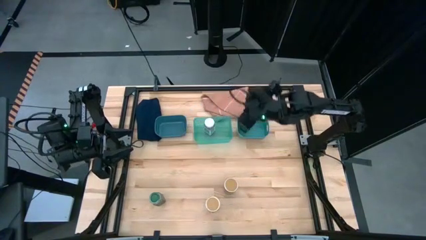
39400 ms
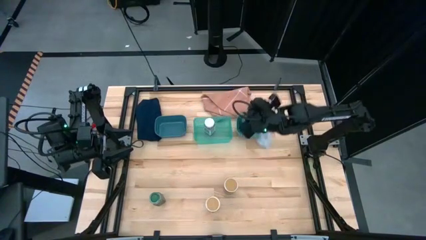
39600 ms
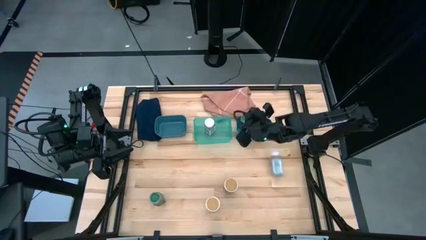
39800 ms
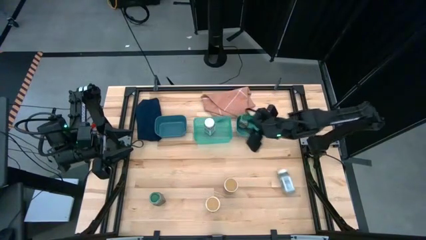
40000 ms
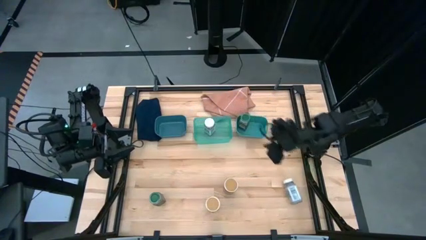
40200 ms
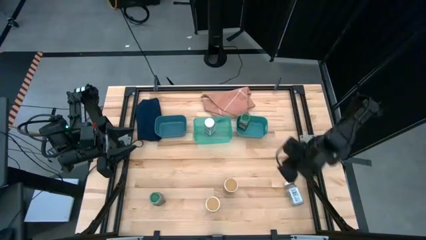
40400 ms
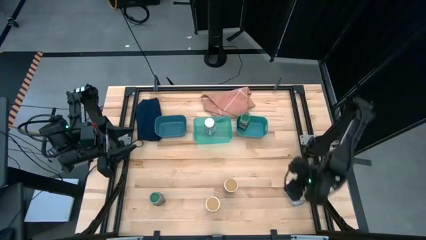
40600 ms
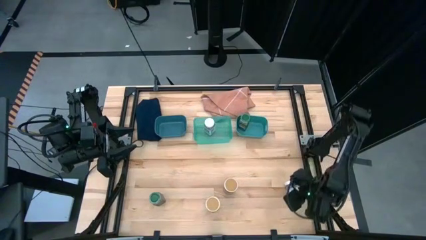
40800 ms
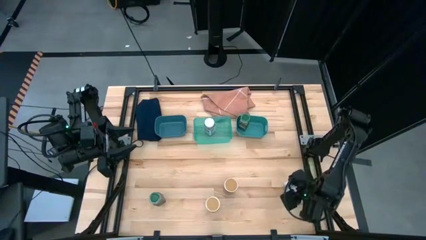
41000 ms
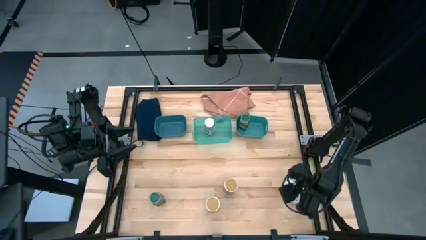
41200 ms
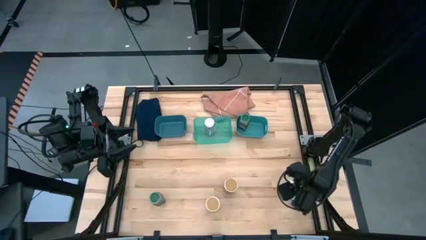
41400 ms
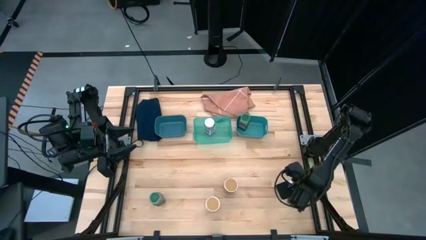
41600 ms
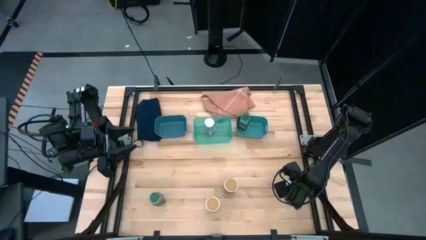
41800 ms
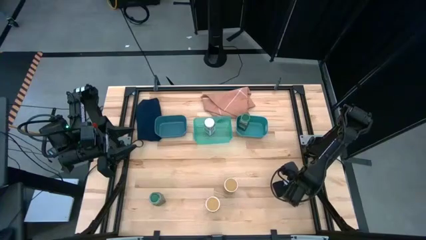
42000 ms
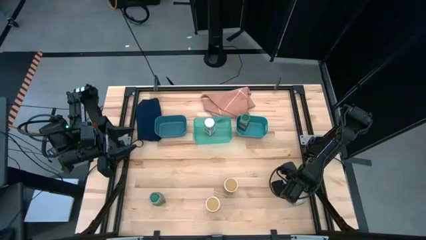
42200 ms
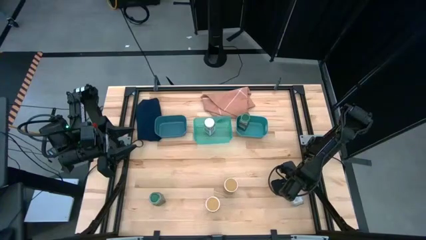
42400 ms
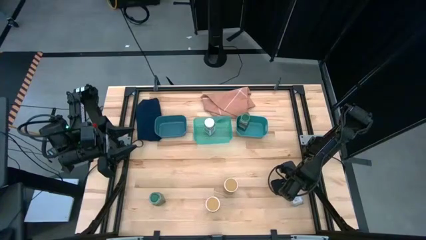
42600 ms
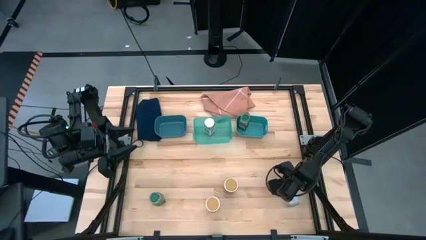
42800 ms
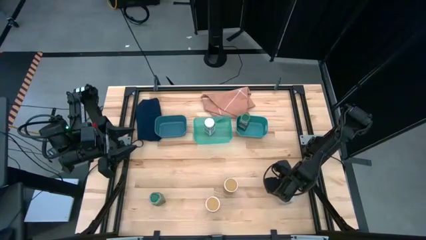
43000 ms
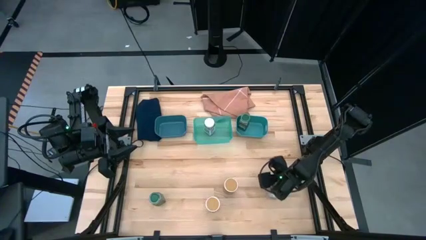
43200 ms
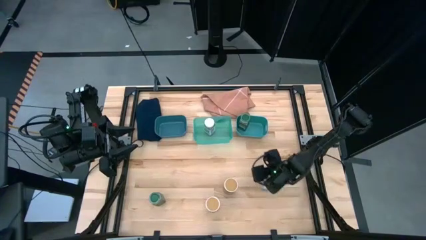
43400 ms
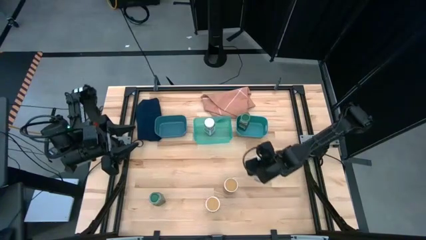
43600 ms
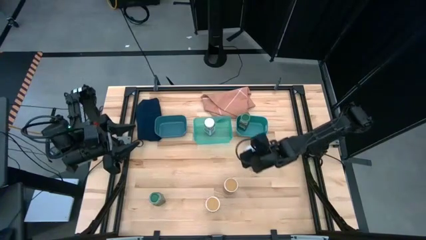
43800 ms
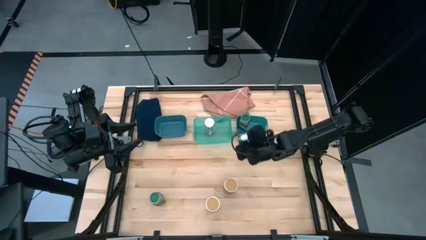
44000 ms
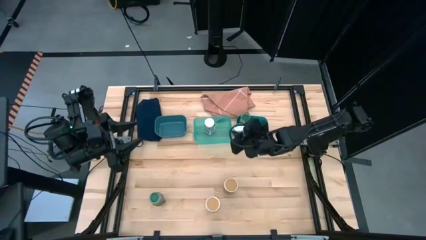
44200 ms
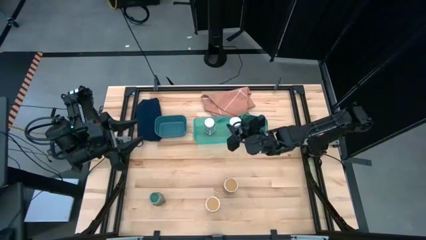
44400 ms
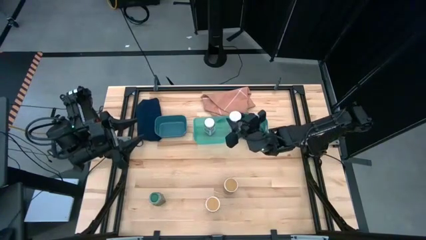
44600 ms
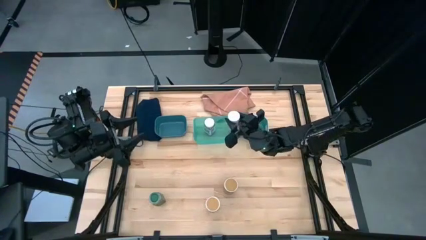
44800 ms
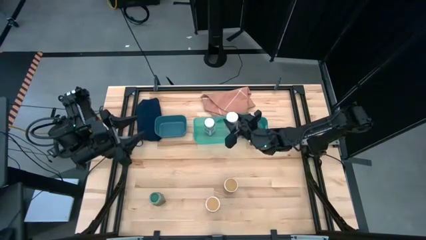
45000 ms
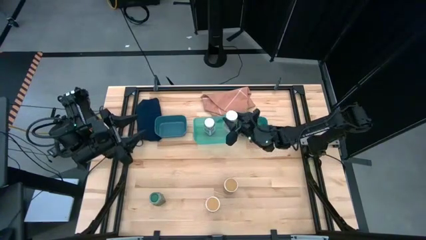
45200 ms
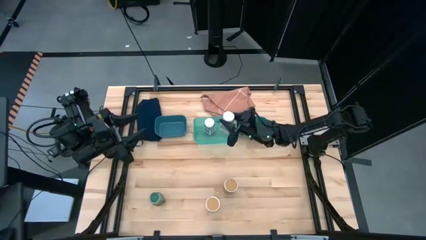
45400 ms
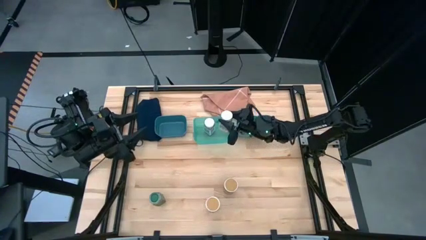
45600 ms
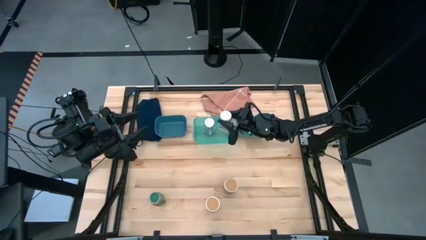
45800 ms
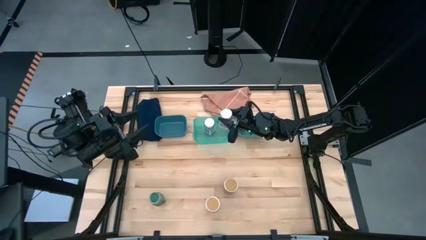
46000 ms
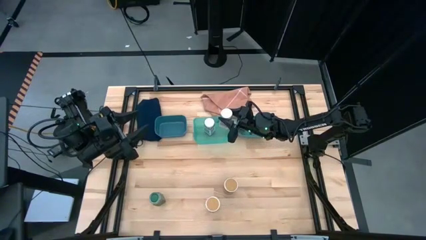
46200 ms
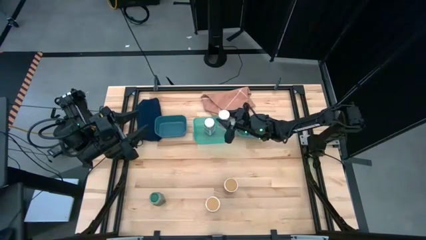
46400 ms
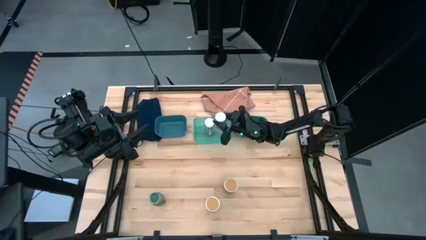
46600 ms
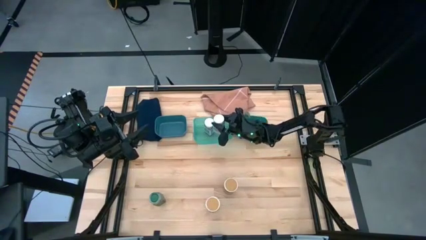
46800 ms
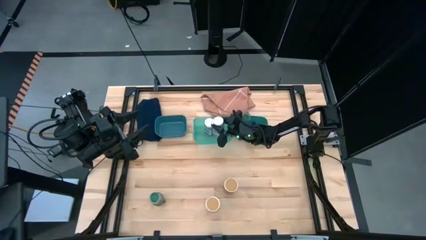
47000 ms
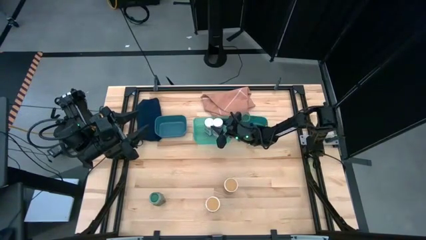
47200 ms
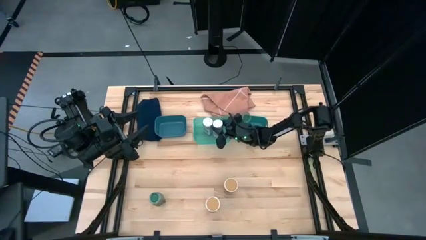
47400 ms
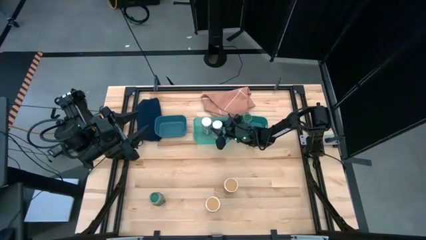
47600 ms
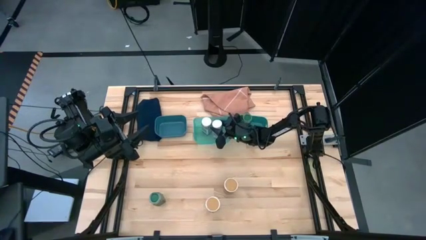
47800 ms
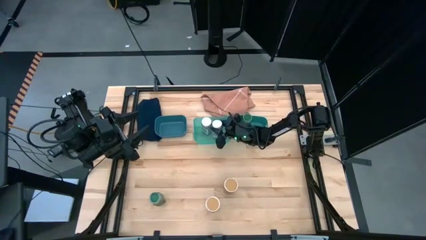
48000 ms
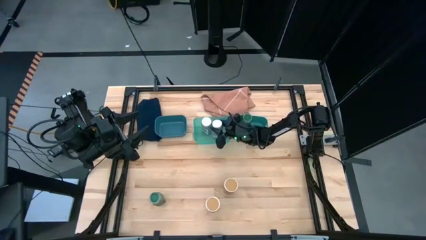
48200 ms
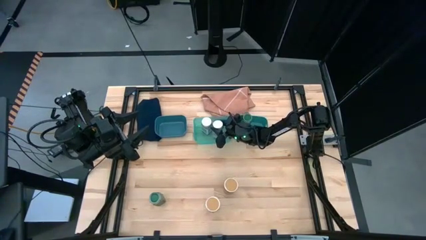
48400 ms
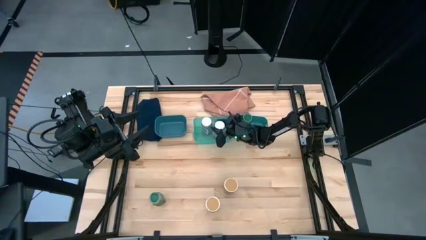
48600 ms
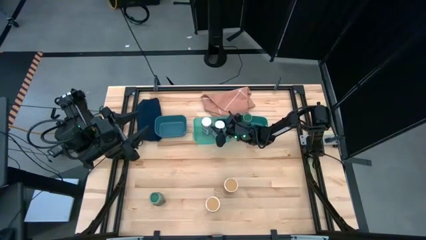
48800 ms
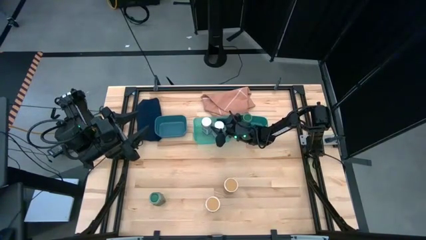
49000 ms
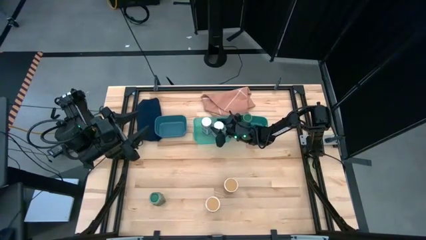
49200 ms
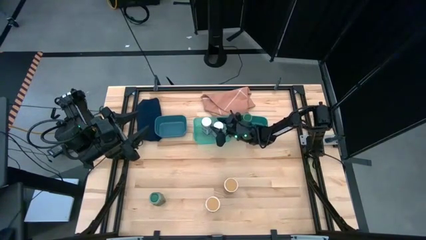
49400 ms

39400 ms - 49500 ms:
Task: Sort spices by type
Put the white seasoning bottle into the transparent green bin
